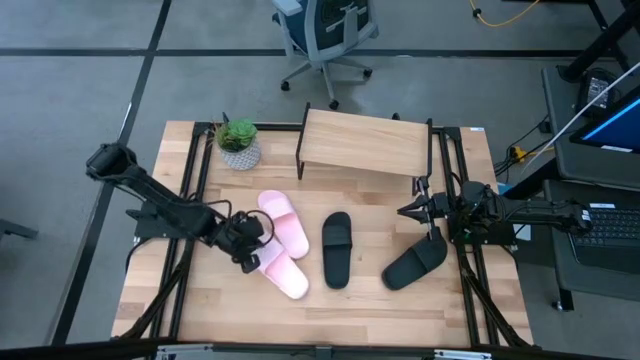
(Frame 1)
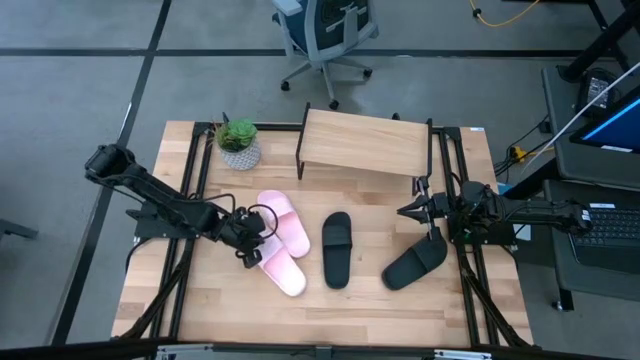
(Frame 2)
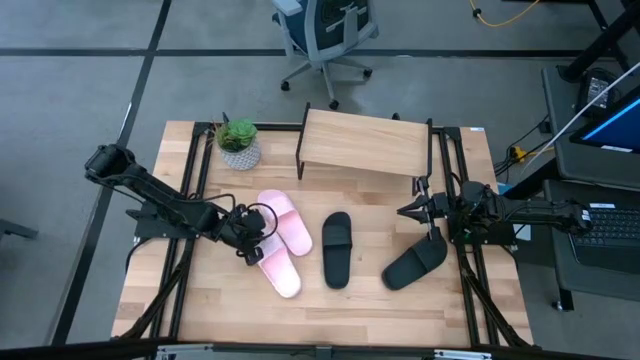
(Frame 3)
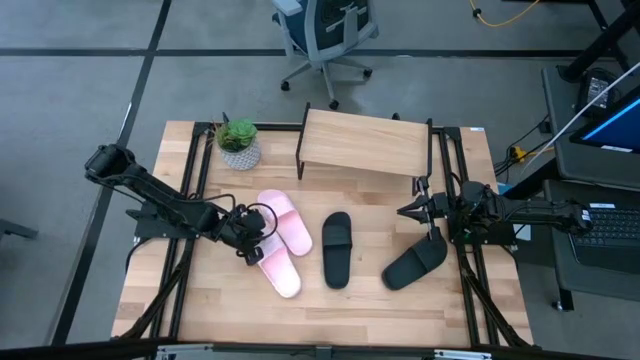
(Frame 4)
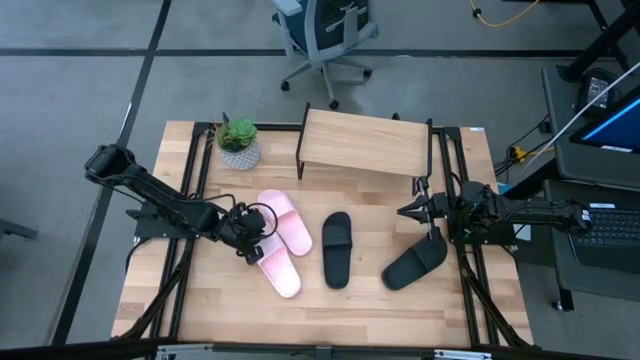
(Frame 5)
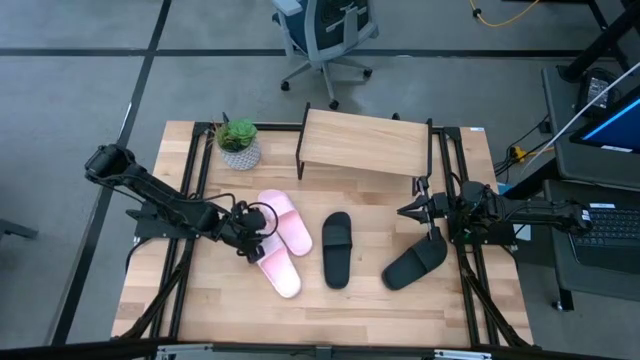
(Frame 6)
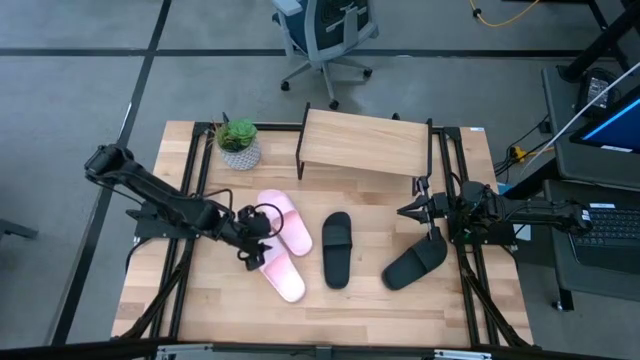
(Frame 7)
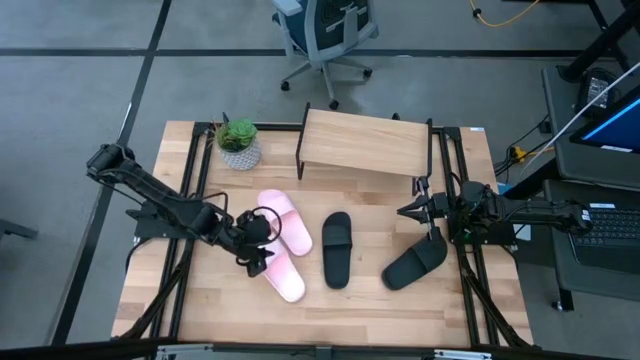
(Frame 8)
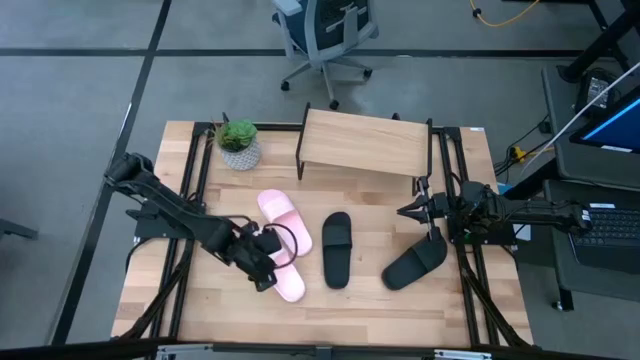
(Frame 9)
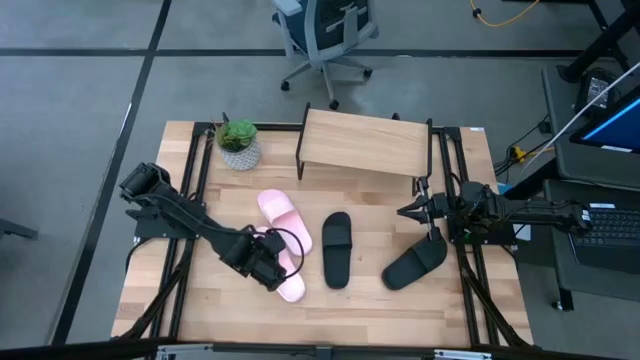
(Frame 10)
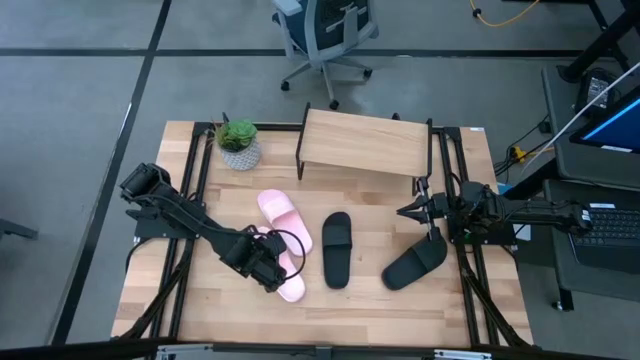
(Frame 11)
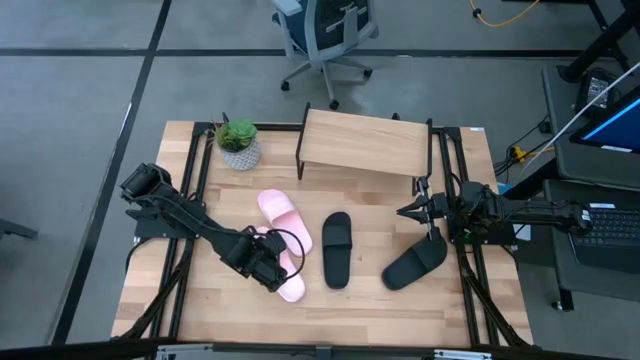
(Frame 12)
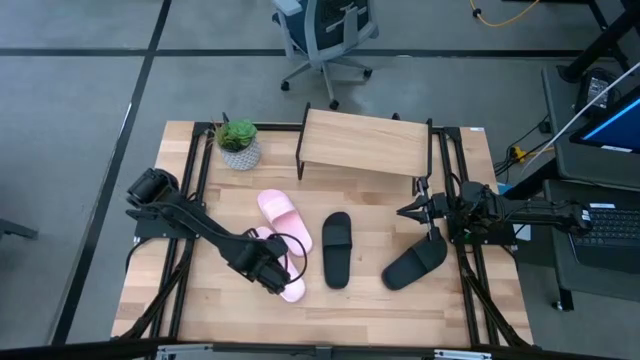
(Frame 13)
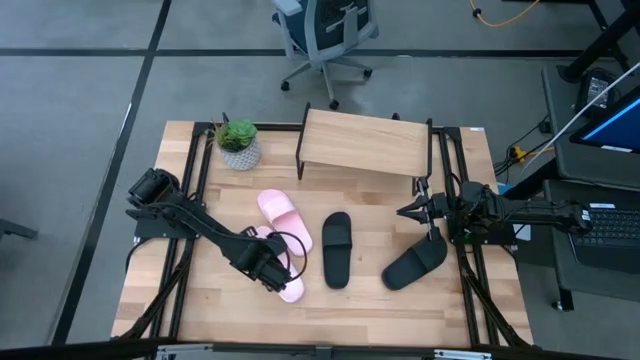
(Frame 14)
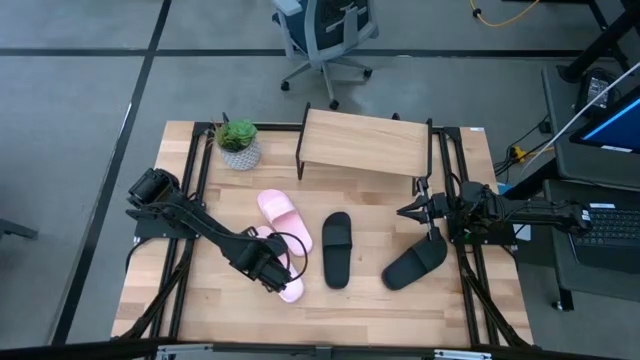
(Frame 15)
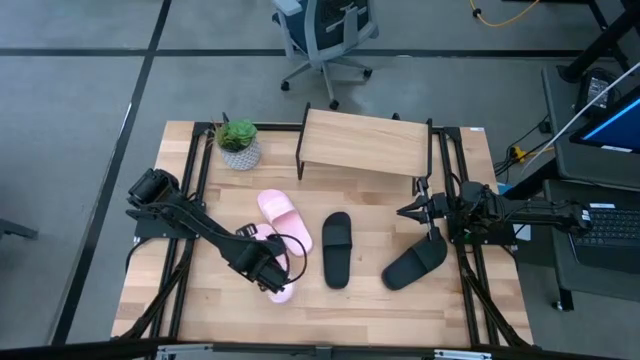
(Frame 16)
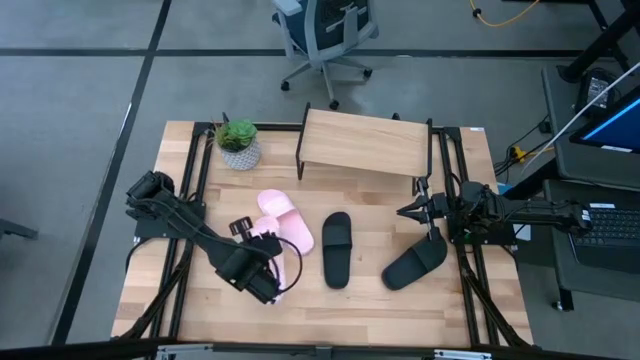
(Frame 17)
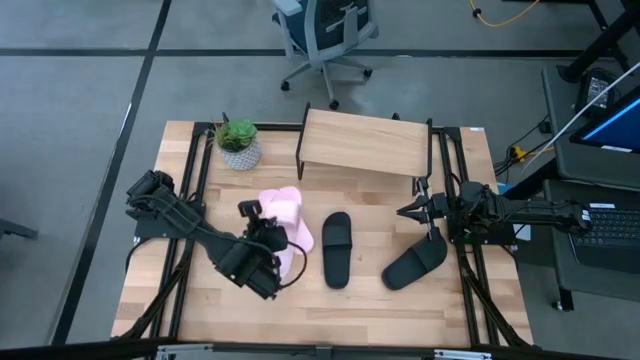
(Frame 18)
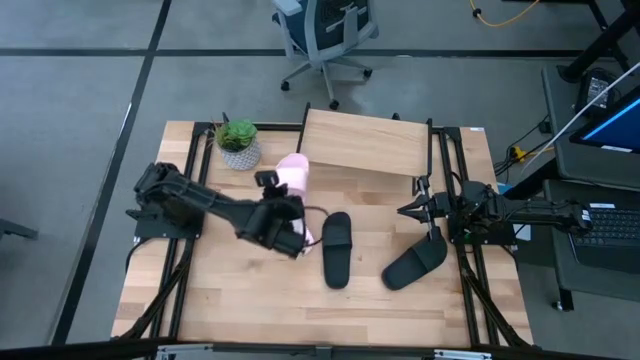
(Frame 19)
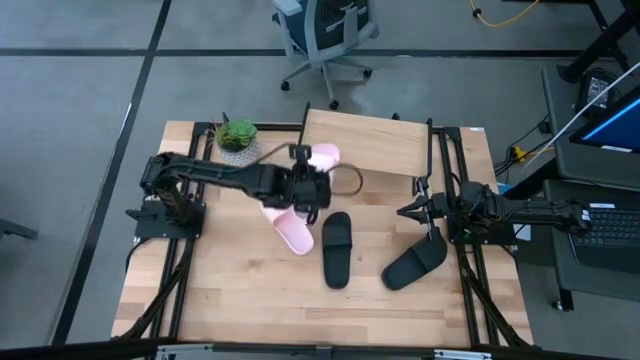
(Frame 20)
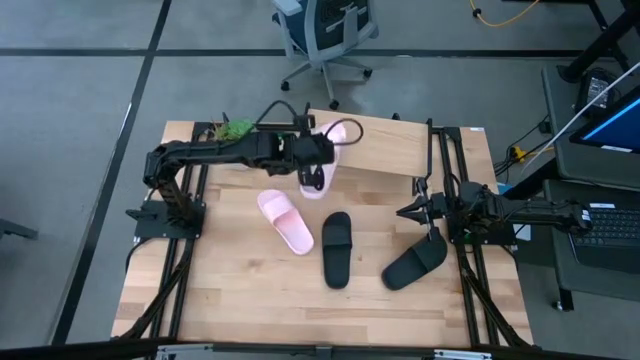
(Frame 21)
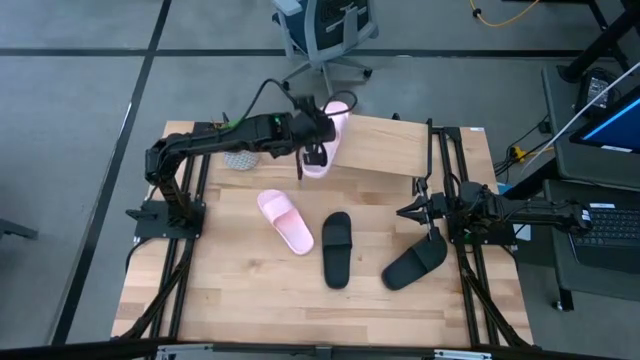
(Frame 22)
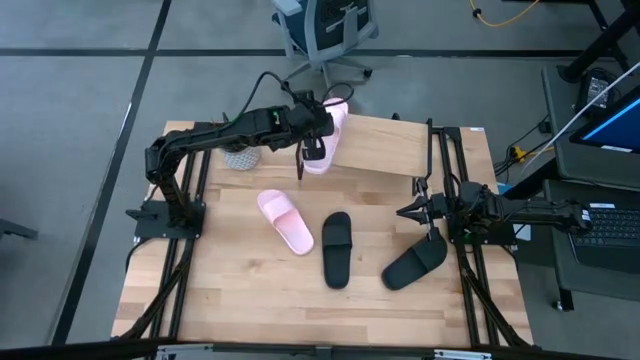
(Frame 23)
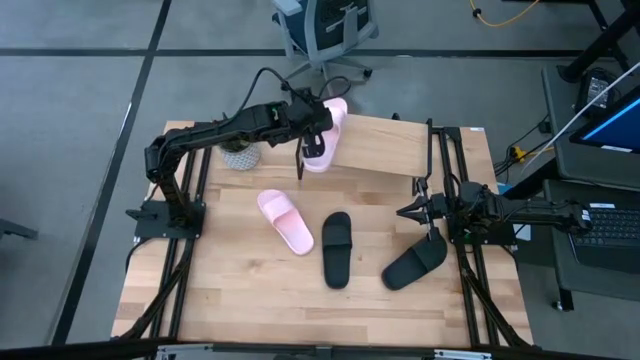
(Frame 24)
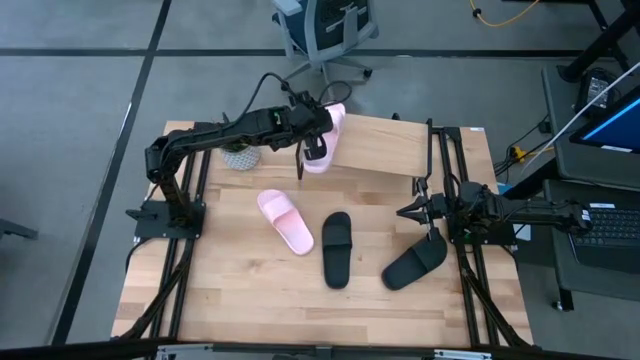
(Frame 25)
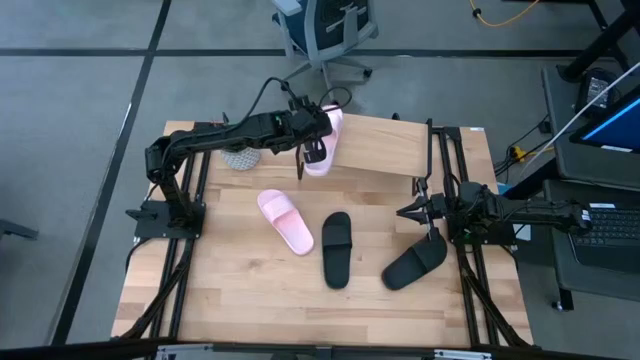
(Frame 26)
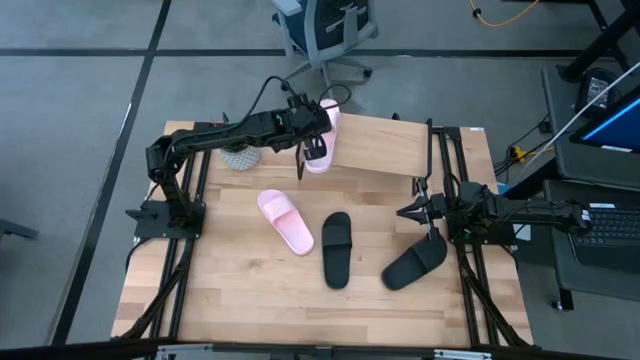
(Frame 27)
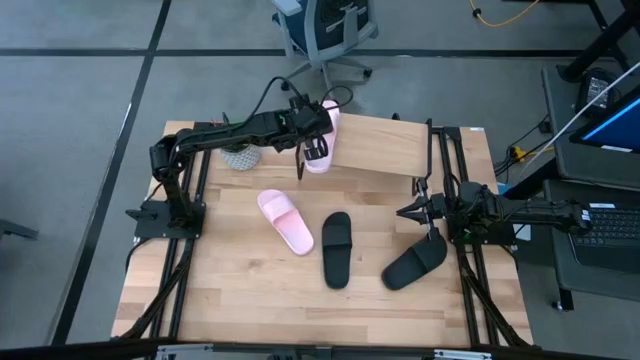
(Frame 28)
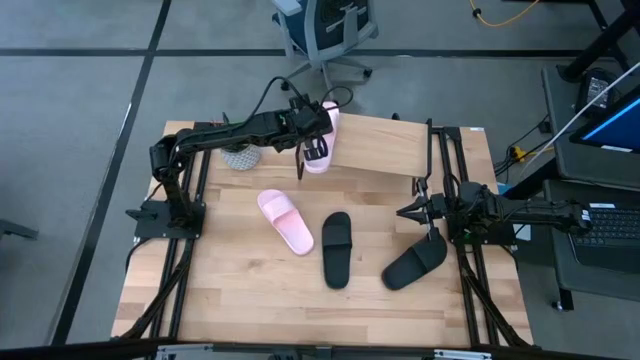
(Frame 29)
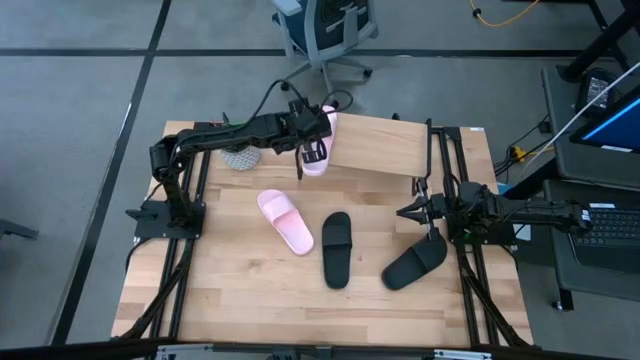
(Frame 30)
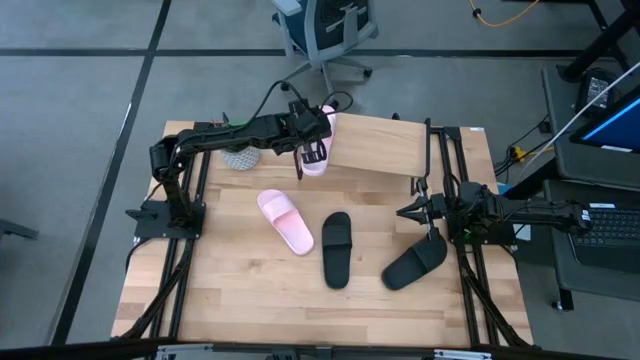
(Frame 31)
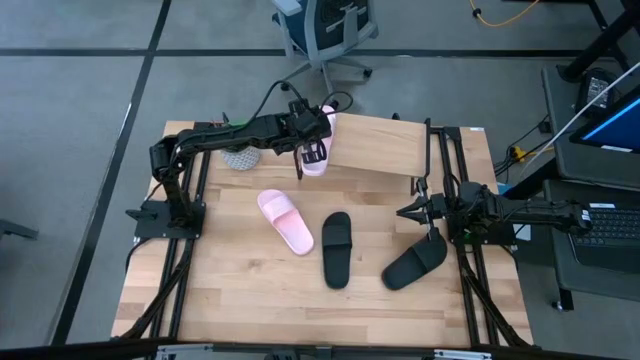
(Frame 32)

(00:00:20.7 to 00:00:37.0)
Task: Pick and place slides into the shelf
Put the bottom pink slide on the shelf

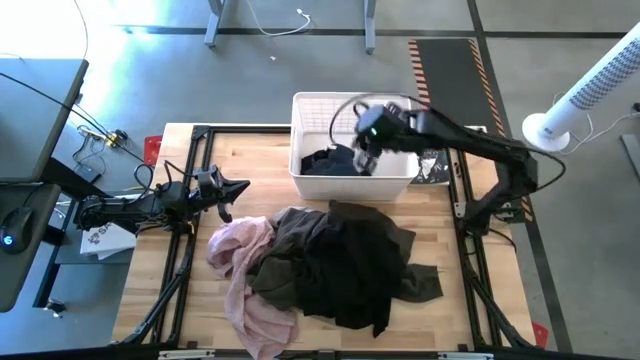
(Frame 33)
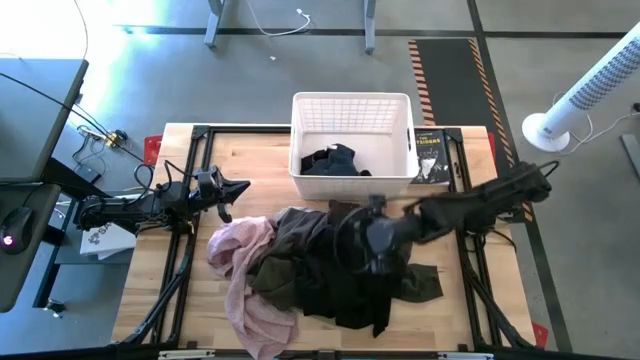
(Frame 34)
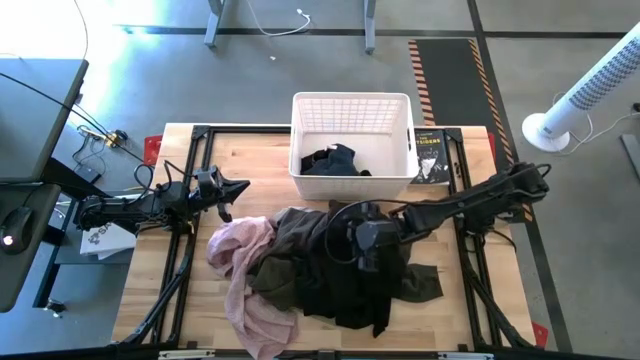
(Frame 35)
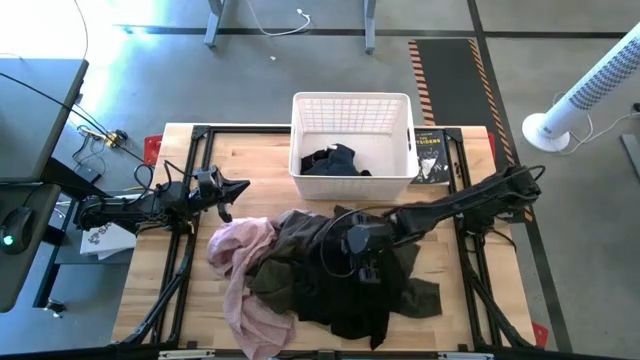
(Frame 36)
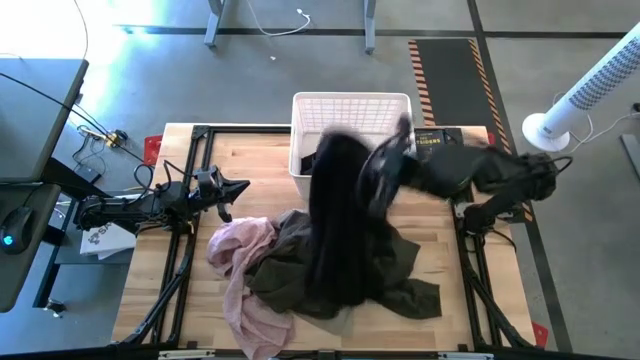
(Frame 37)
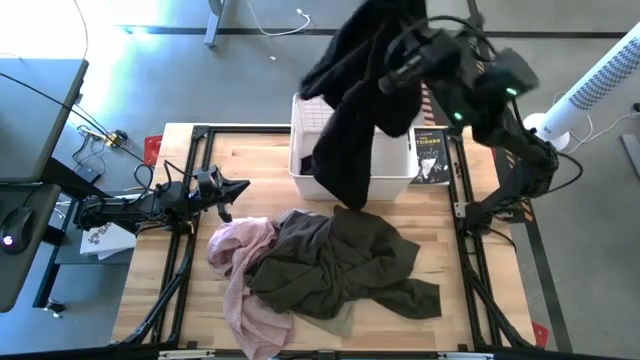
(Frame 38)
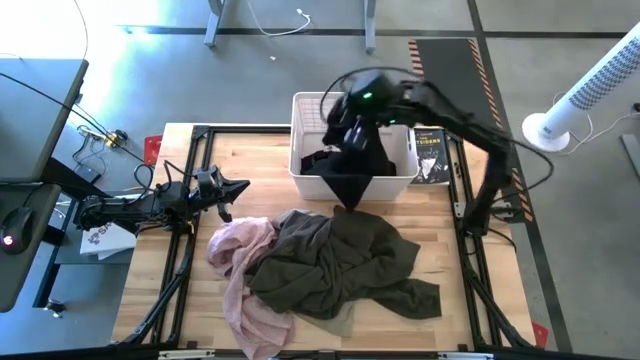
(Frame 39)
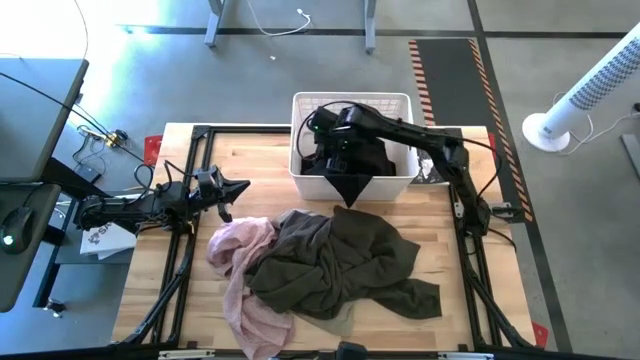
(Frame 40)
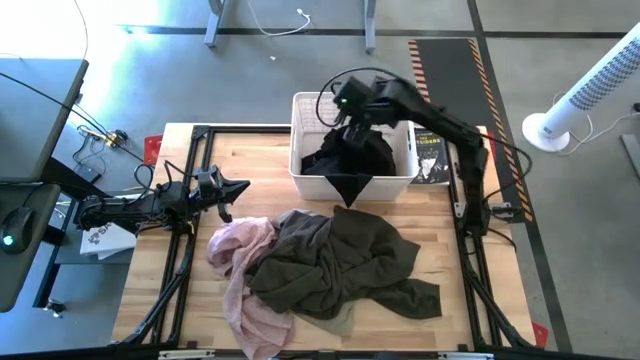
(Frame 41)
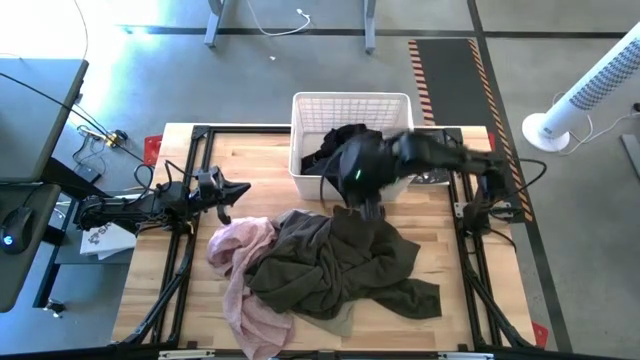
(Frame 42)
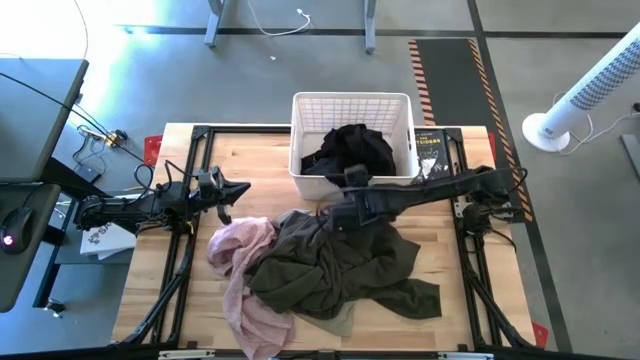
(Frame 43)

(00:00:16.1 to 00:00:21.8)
Task: Sort clothes
Put the black shorts into the laundry bin
